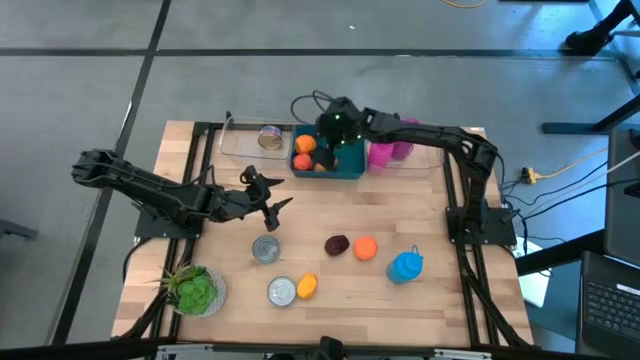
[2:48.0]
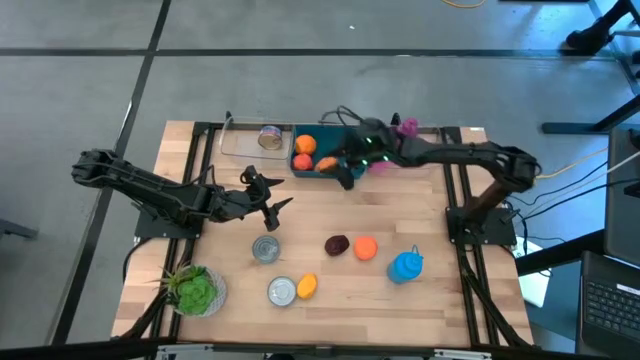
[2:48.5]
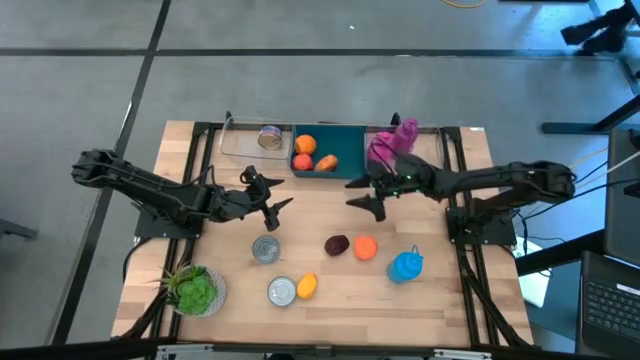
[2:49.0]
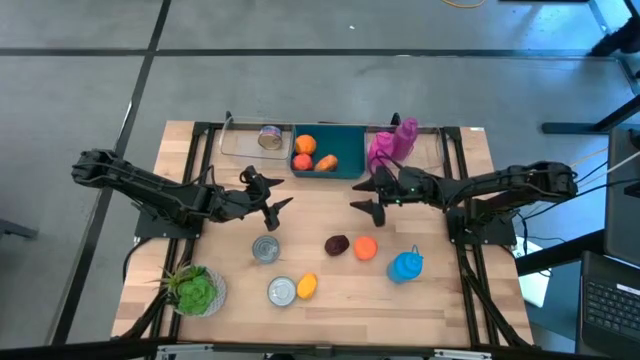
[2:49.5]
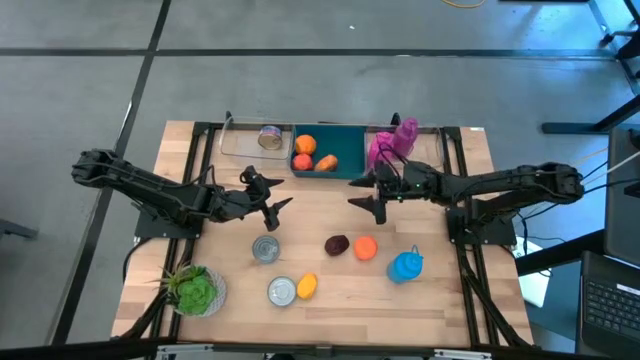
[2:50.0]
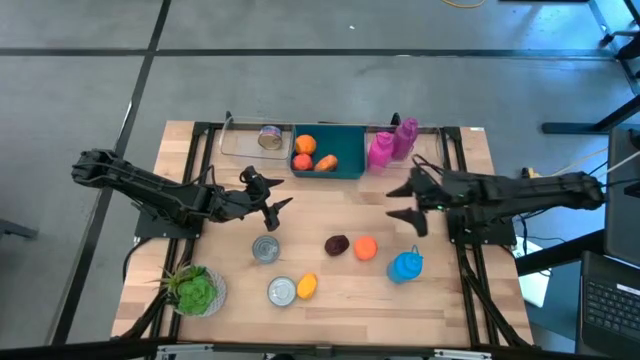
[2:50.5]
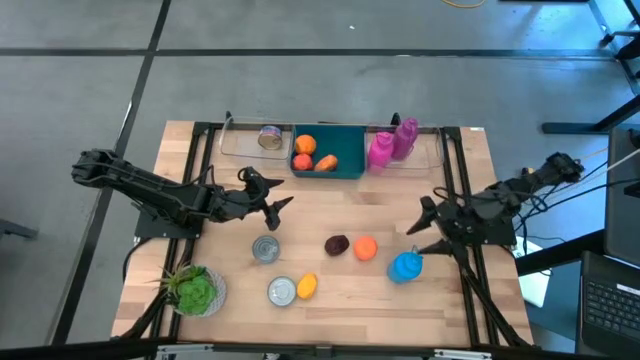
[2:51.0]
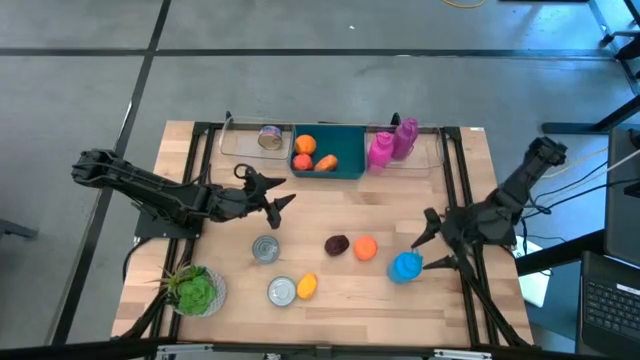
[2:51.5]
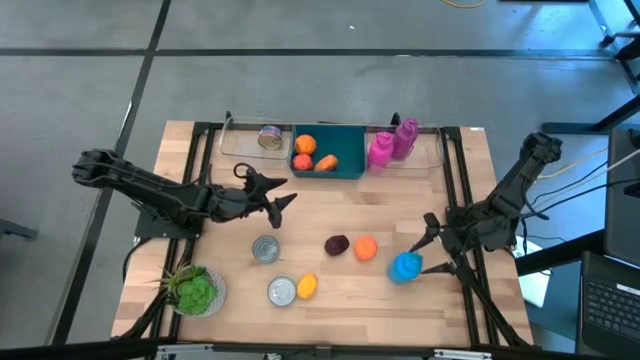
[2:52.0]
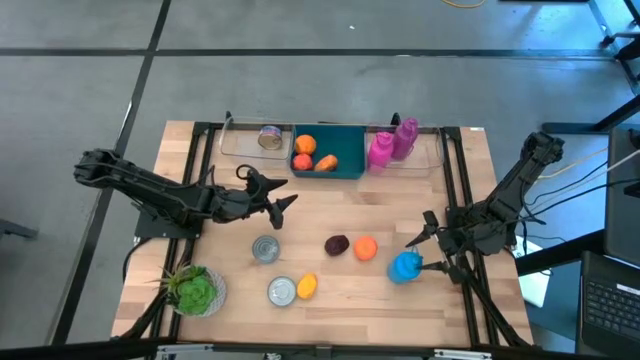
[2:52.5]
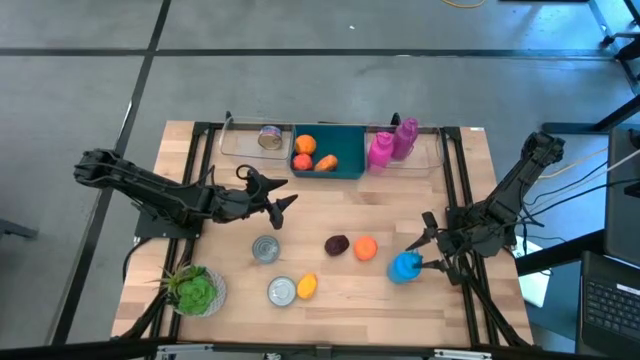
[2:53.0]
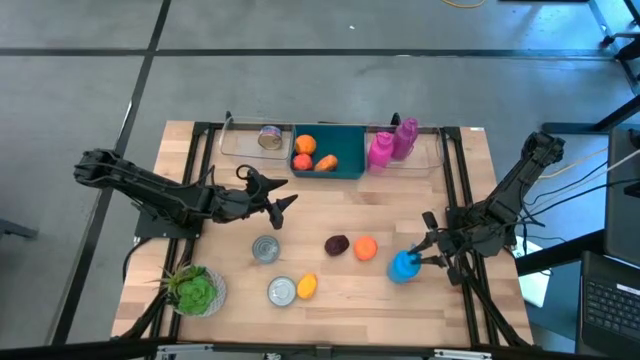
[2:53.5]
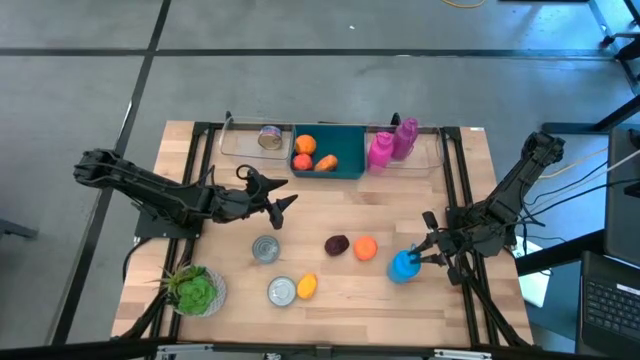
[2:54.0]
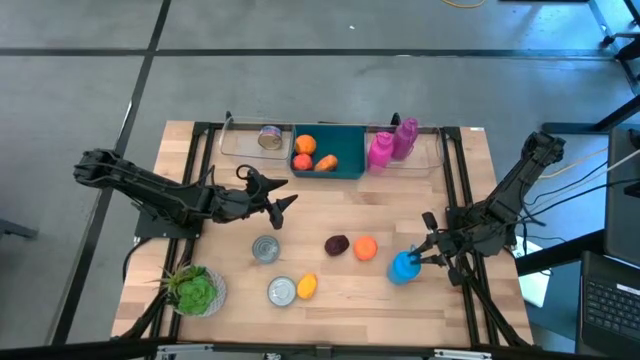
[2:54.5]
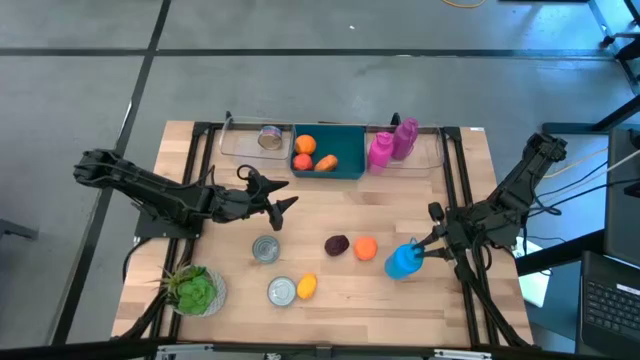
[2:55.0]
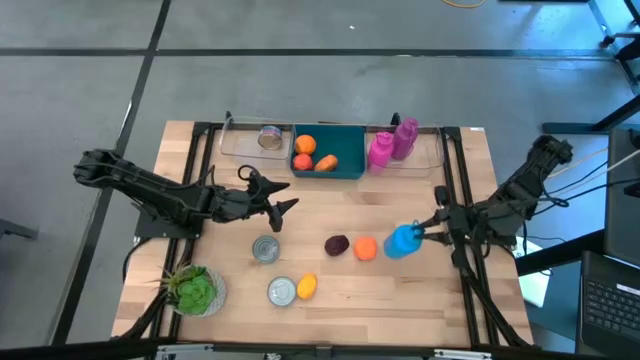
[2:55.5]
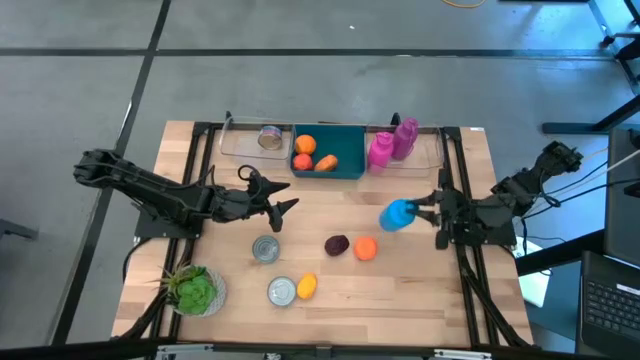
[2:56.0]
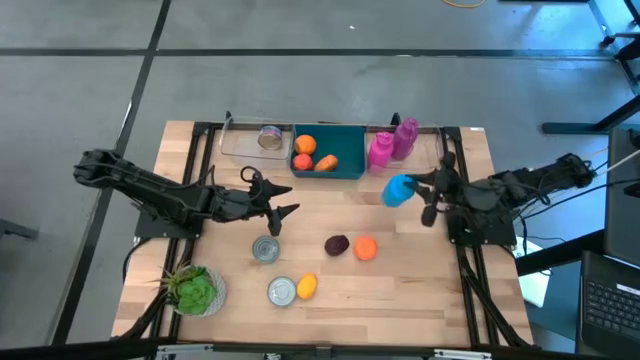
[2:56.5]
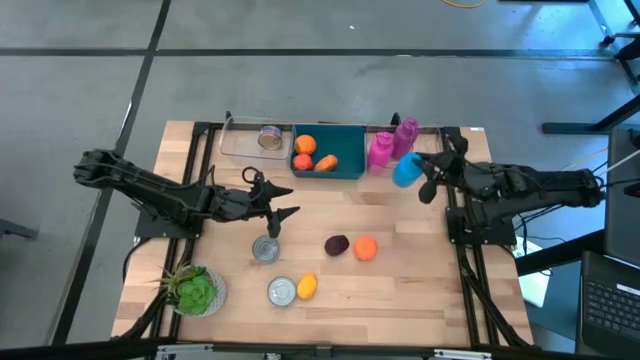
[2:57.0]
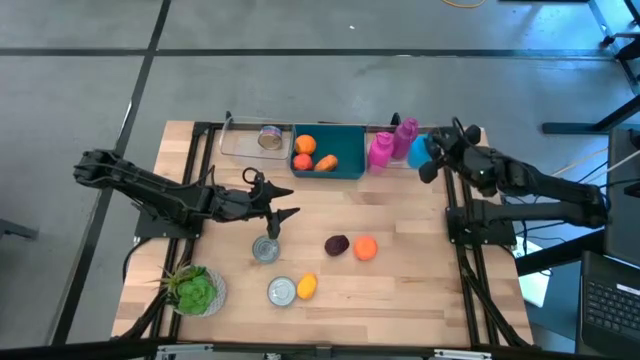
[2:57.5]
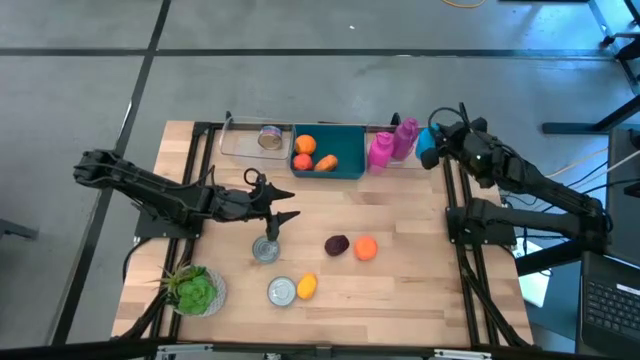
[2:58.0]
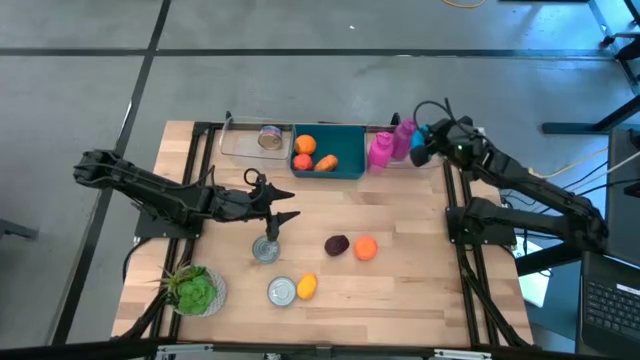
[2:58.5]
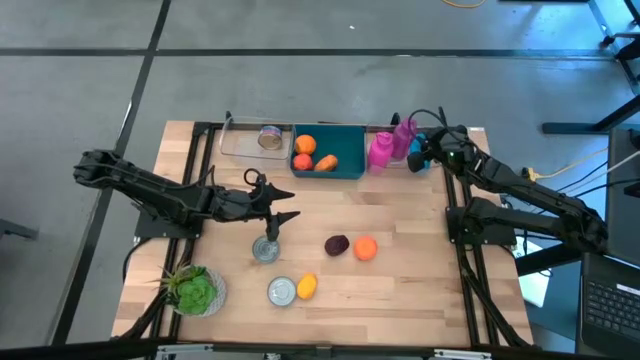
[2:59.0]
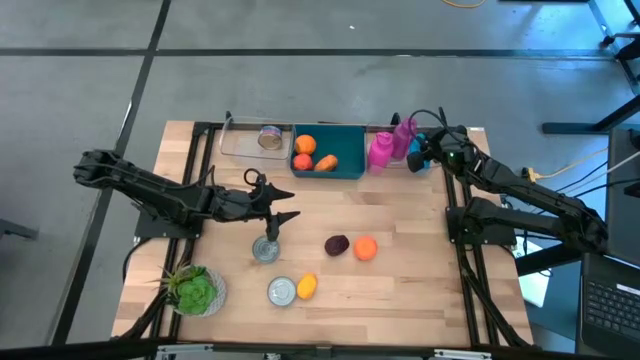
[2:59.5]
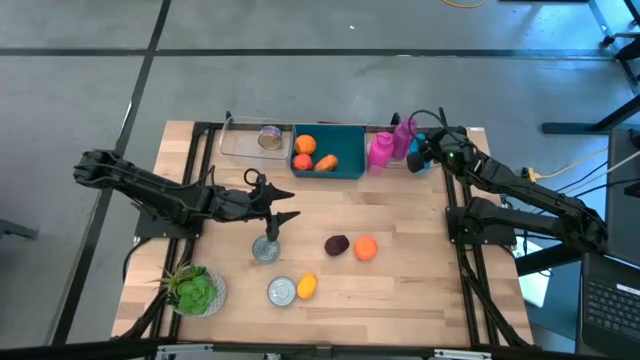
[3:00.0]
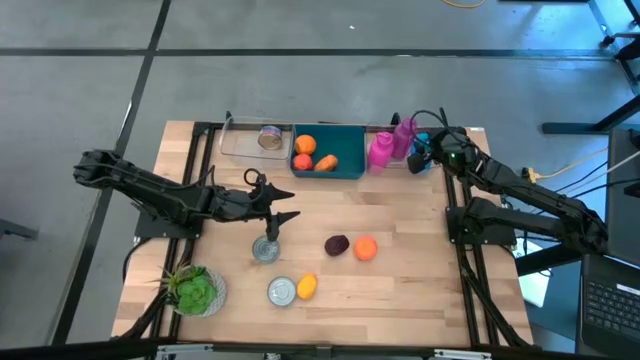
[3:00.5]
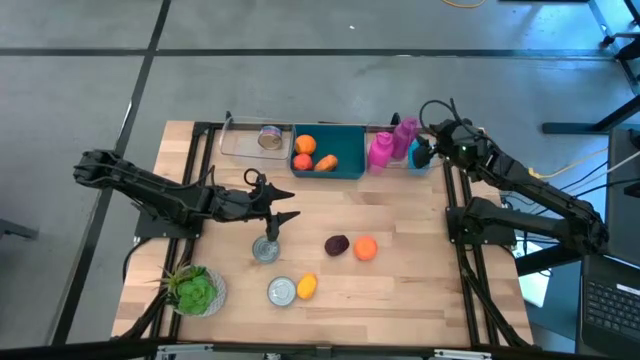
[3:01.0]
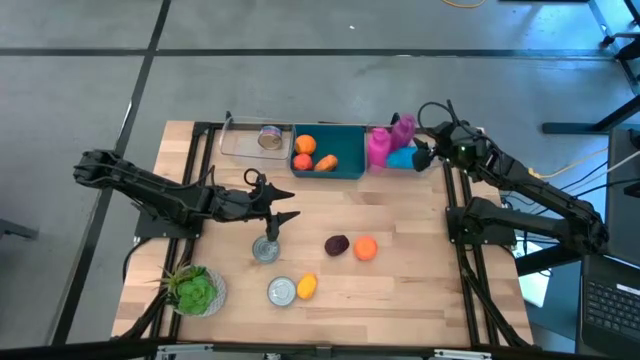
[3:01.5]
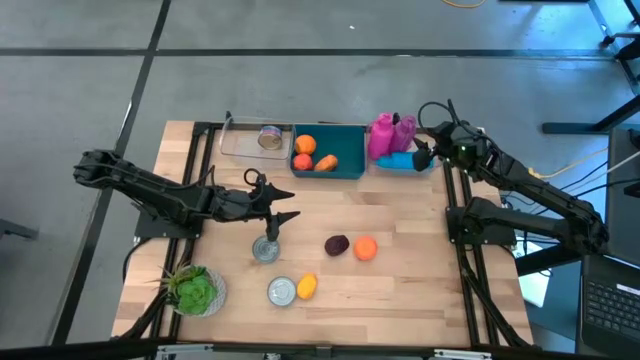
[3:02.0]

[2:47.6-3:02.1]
Task: Pick & Place Food Item
Put the blue water bottle into the right transparent bin

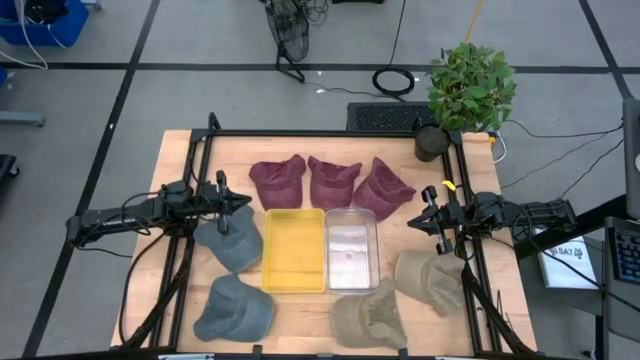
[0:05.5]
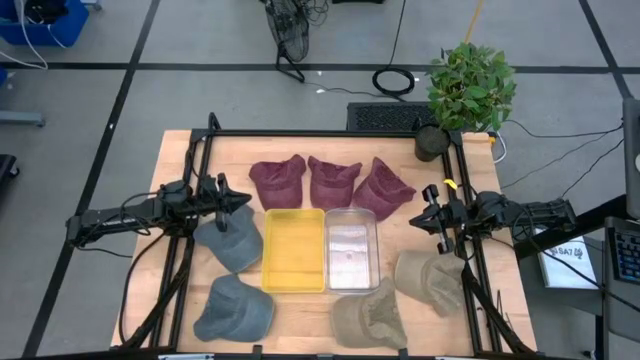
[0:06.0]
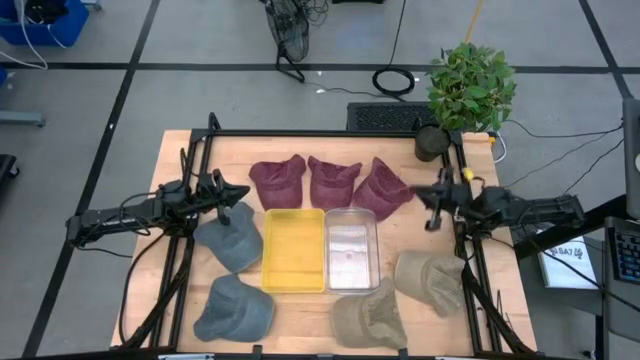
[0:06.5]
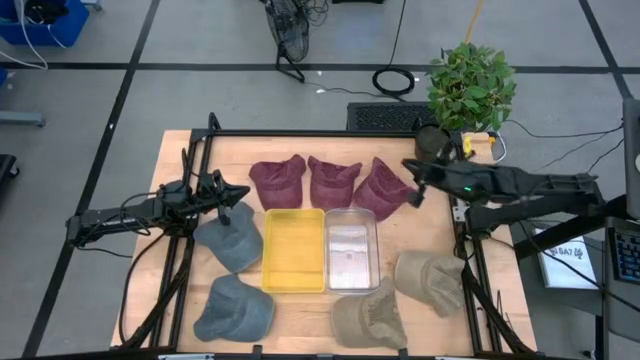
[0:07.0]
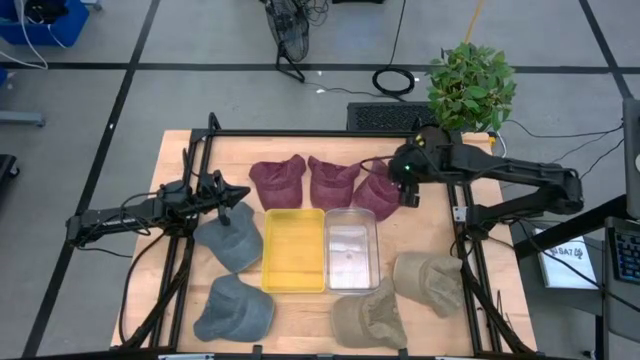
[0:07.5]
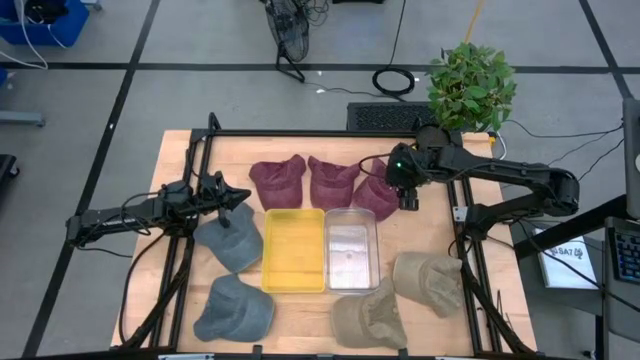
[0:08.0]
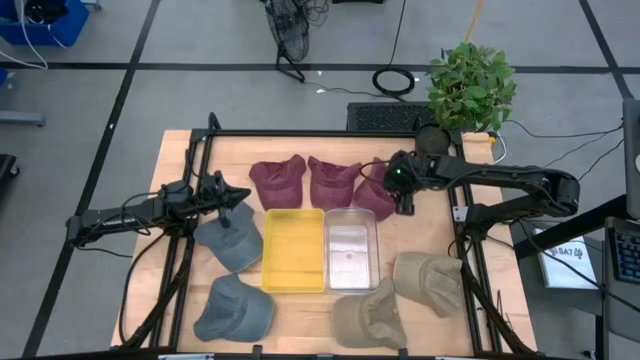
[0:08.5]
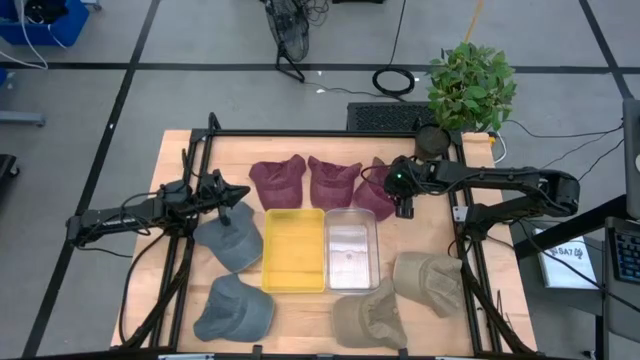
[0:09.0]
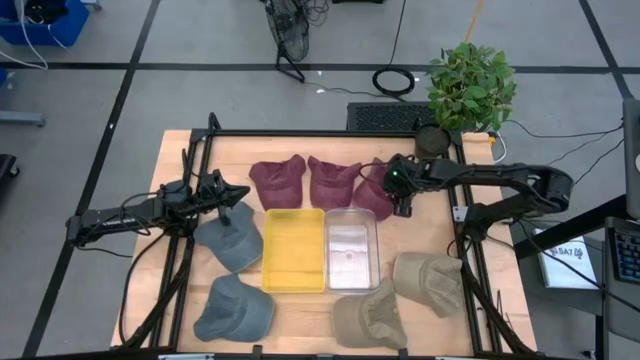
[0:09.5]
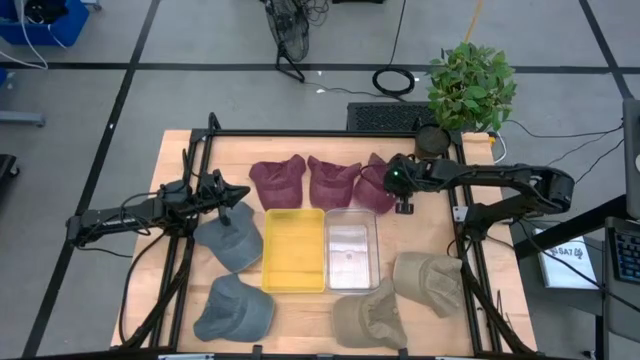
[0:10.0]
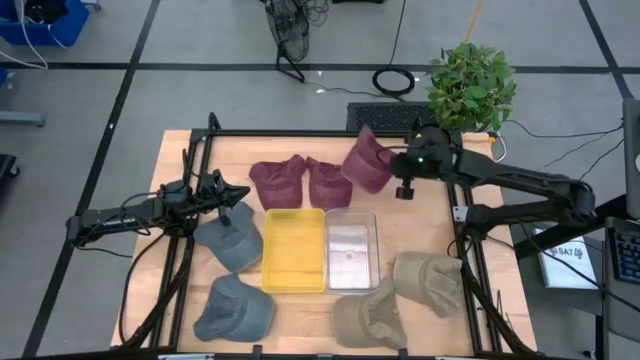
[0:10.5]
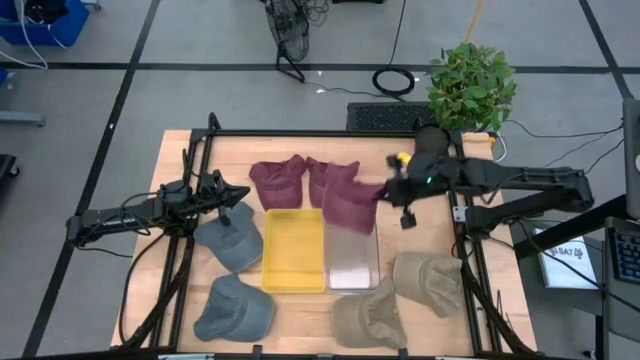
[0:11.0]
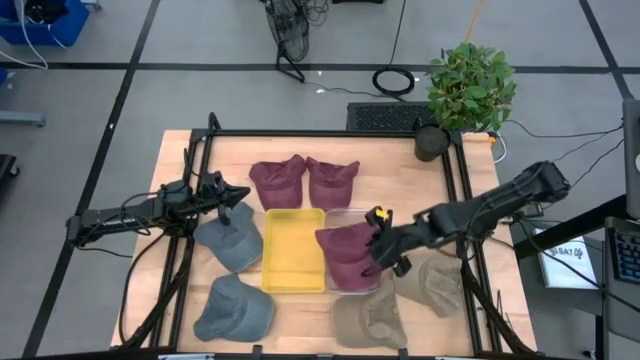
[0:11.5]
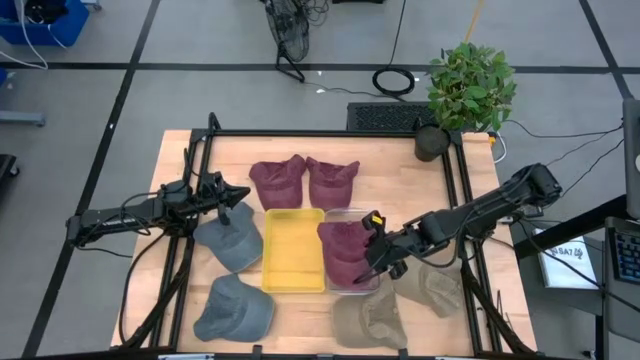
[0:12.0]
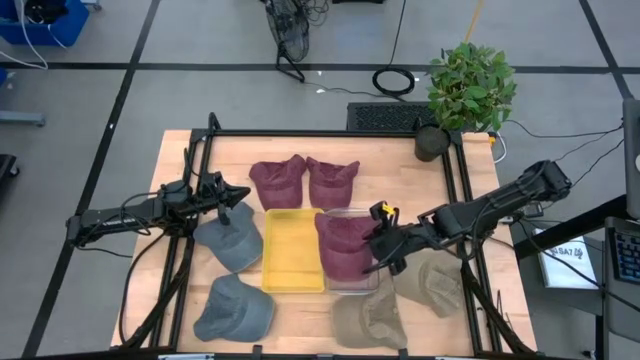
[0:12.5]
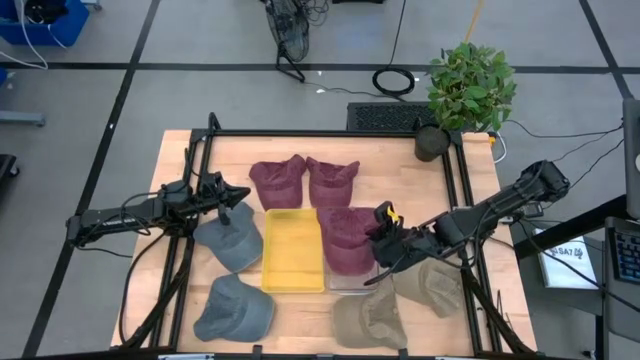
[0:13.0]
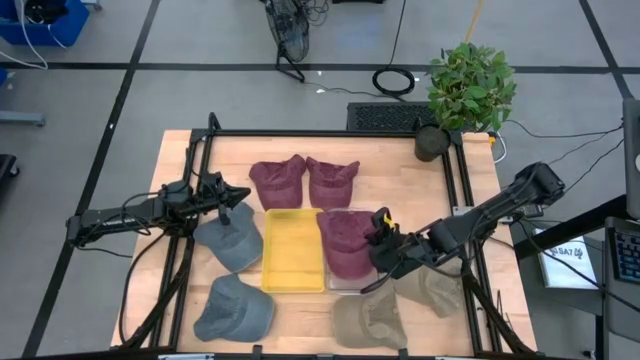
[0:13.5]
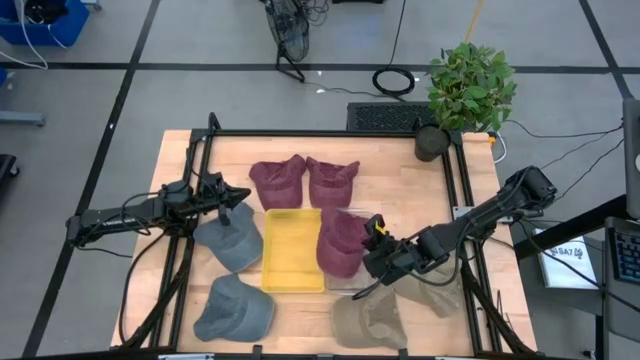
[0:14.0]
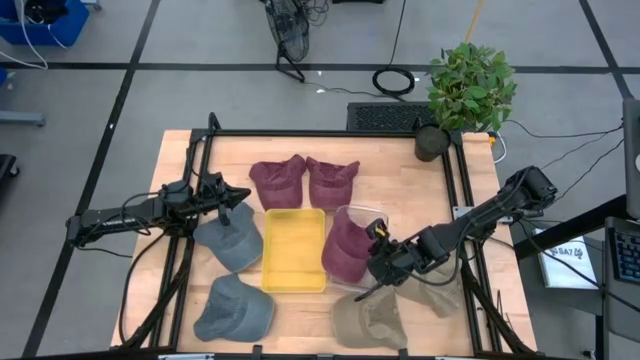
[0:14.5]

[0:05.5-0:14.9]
Task: Pick & Place hat
Put the right red cap into the transparent bin
